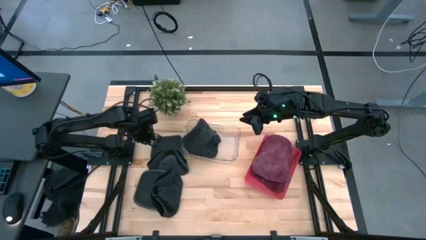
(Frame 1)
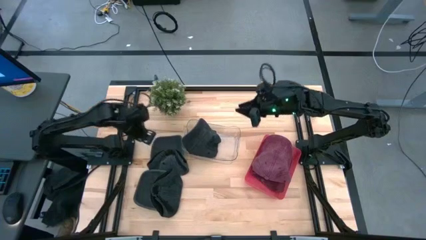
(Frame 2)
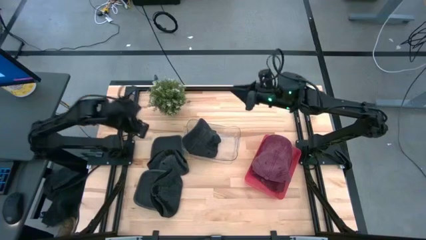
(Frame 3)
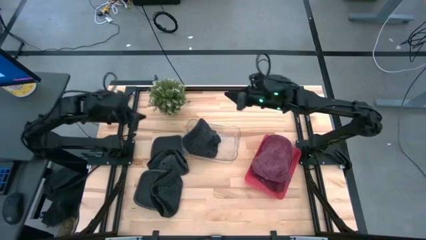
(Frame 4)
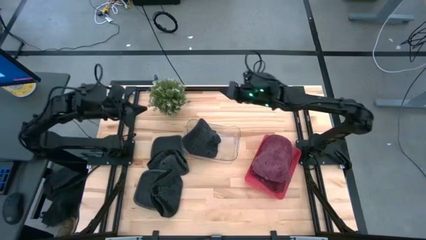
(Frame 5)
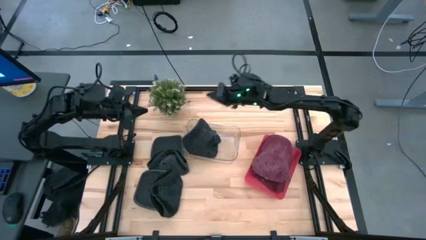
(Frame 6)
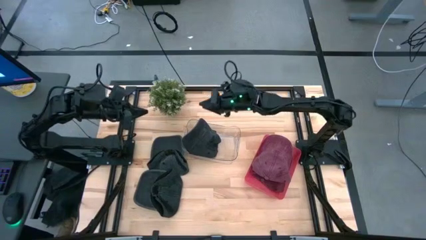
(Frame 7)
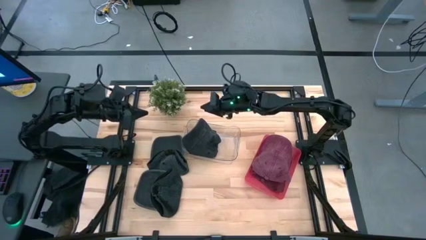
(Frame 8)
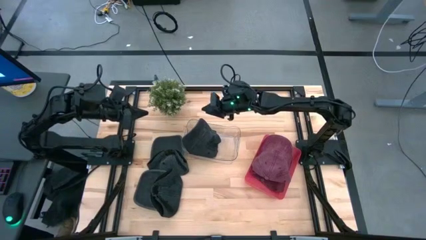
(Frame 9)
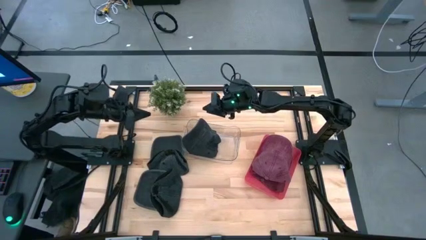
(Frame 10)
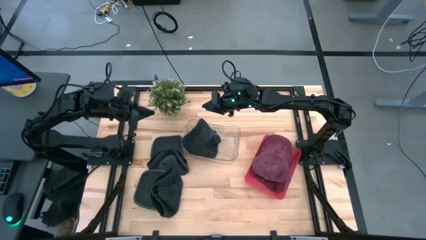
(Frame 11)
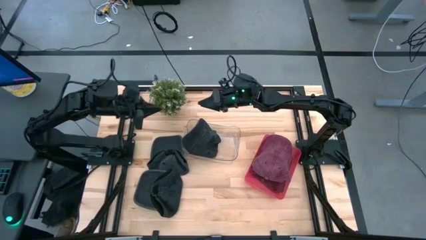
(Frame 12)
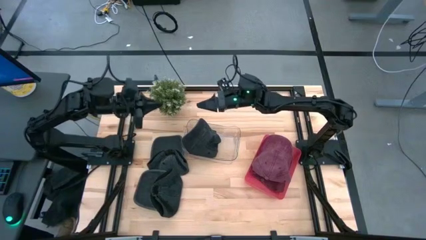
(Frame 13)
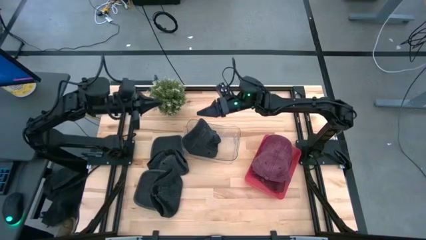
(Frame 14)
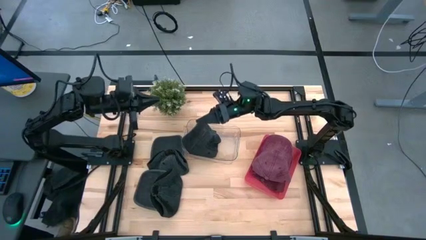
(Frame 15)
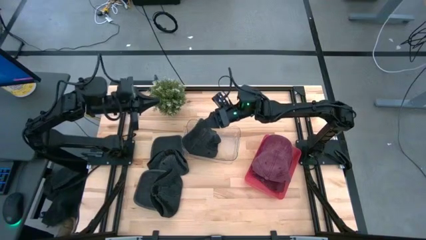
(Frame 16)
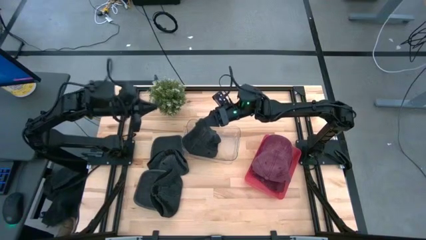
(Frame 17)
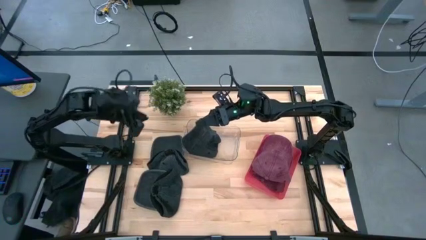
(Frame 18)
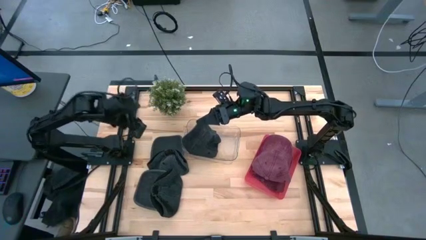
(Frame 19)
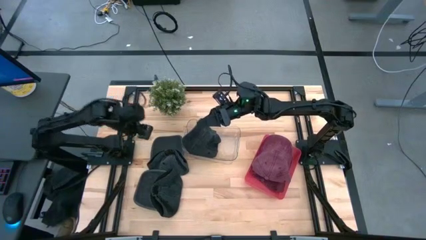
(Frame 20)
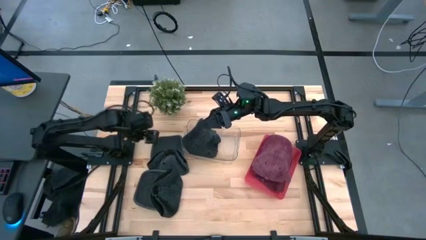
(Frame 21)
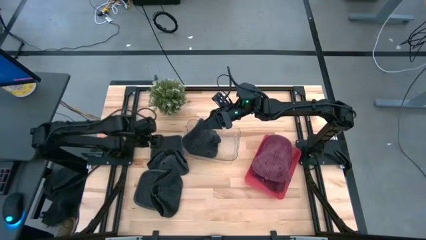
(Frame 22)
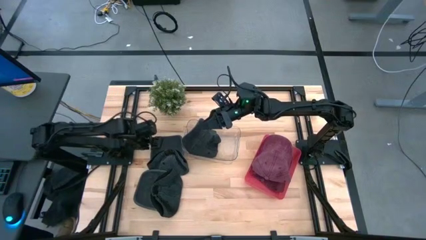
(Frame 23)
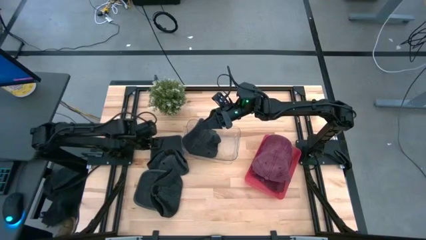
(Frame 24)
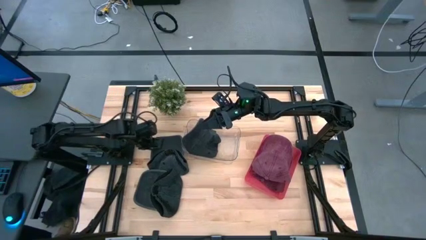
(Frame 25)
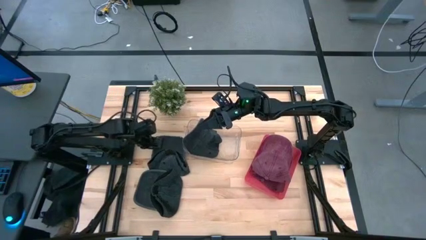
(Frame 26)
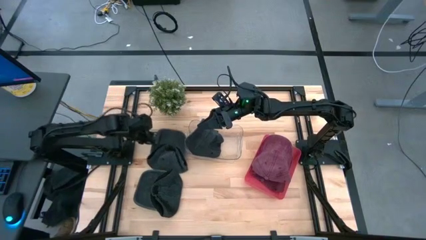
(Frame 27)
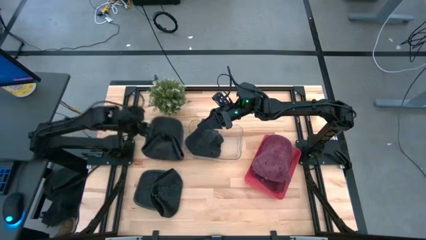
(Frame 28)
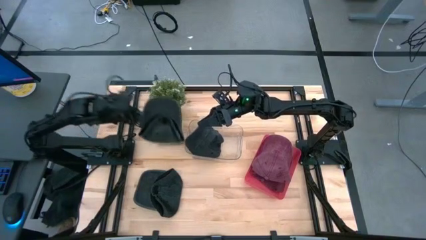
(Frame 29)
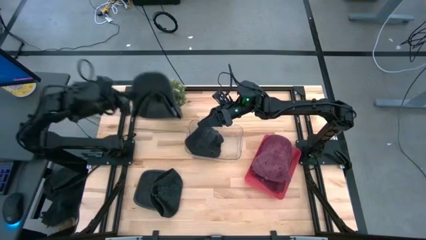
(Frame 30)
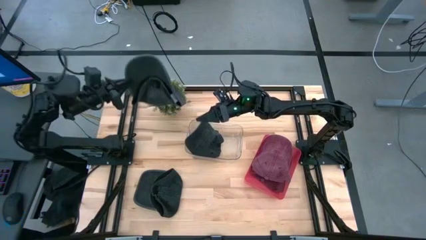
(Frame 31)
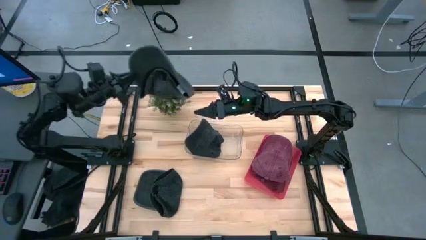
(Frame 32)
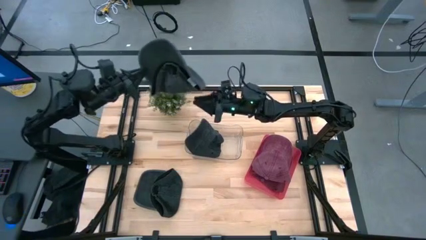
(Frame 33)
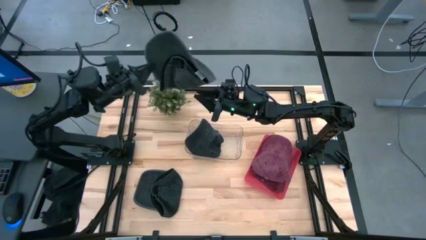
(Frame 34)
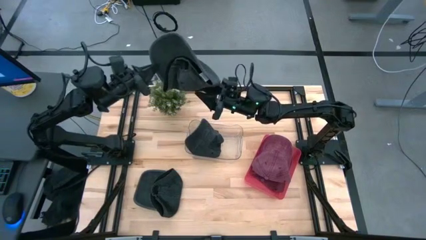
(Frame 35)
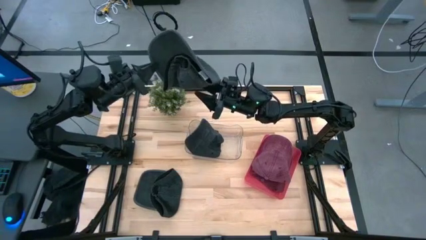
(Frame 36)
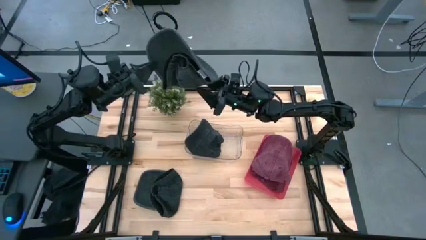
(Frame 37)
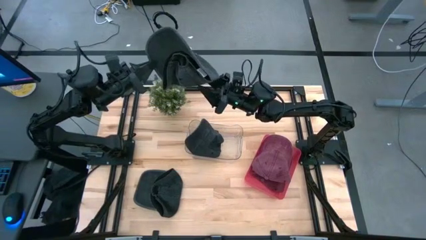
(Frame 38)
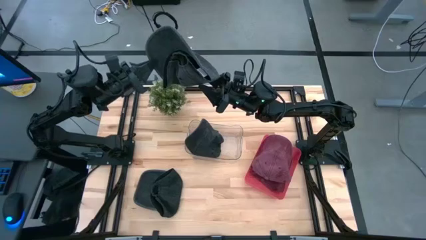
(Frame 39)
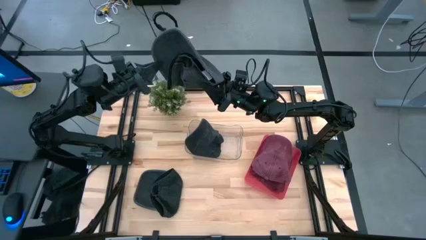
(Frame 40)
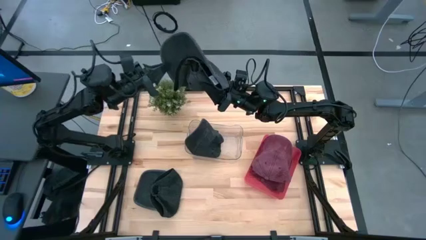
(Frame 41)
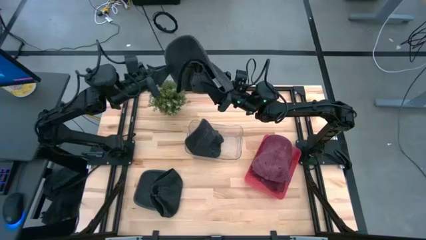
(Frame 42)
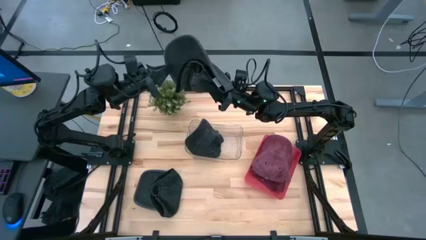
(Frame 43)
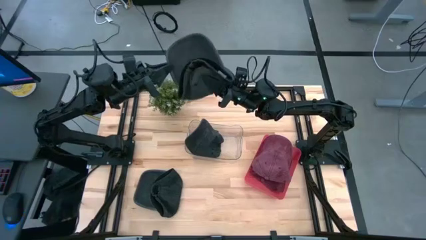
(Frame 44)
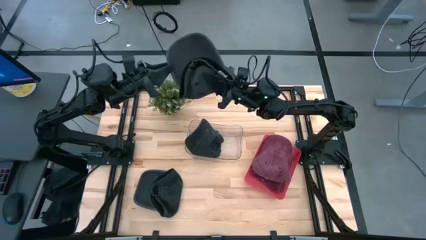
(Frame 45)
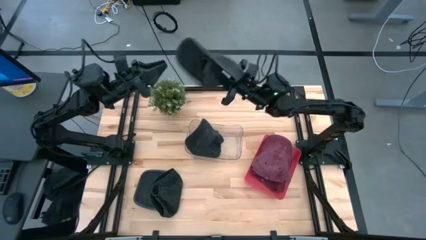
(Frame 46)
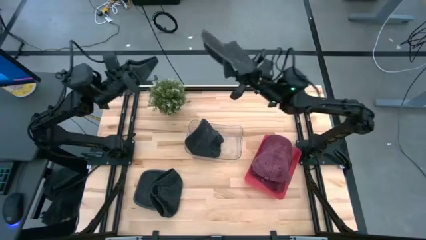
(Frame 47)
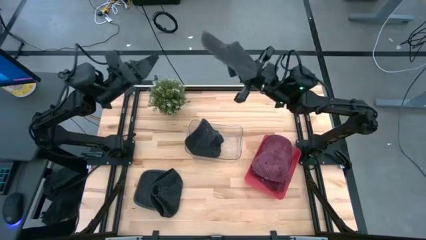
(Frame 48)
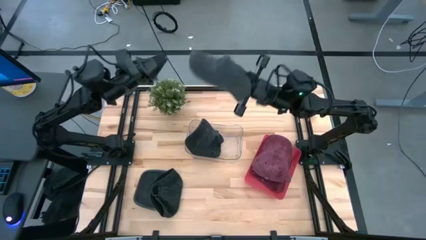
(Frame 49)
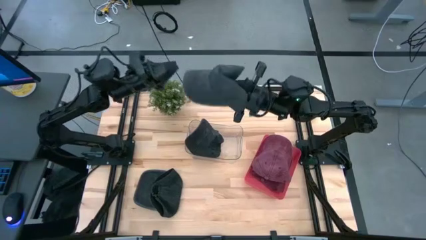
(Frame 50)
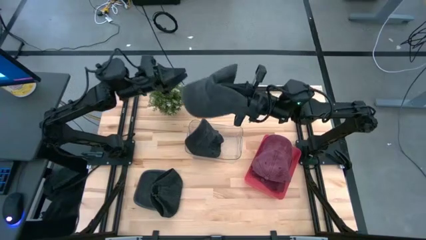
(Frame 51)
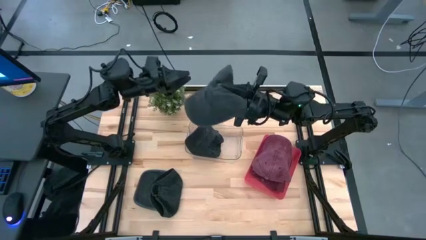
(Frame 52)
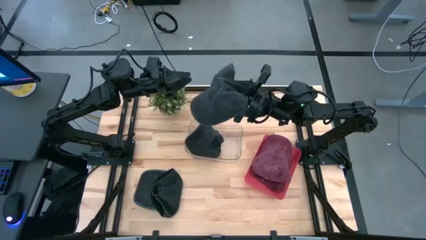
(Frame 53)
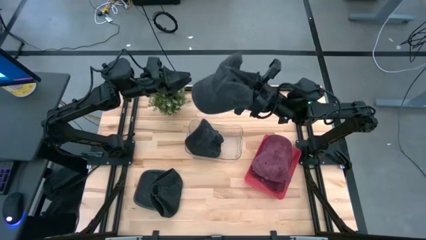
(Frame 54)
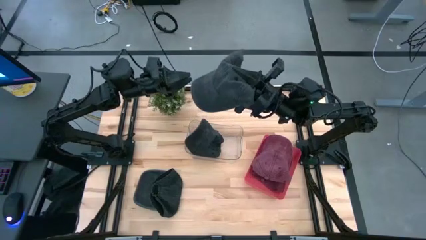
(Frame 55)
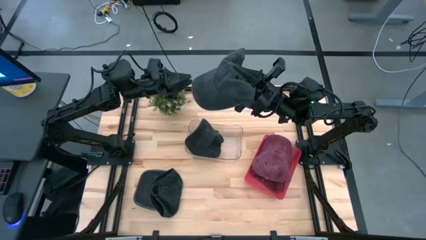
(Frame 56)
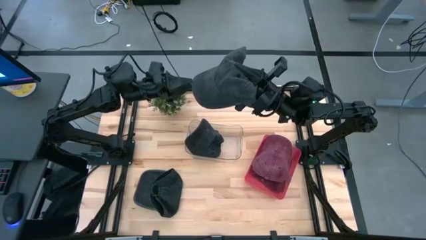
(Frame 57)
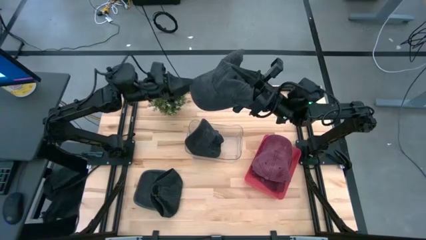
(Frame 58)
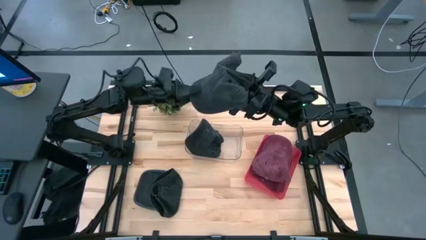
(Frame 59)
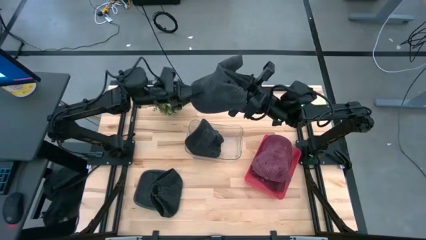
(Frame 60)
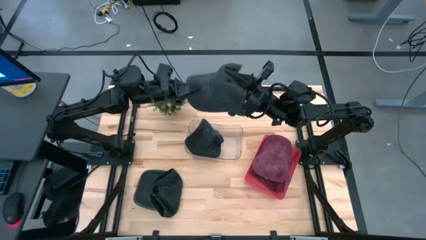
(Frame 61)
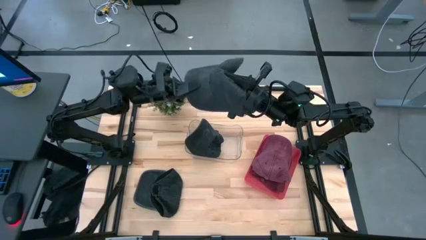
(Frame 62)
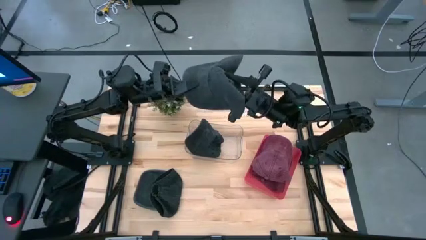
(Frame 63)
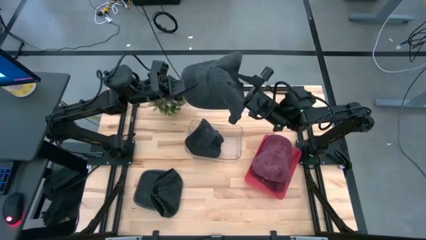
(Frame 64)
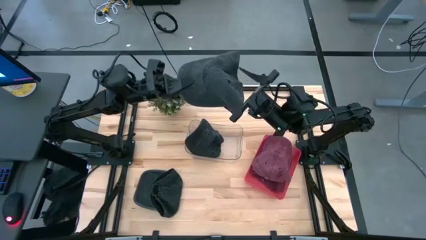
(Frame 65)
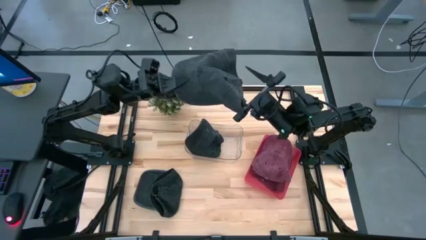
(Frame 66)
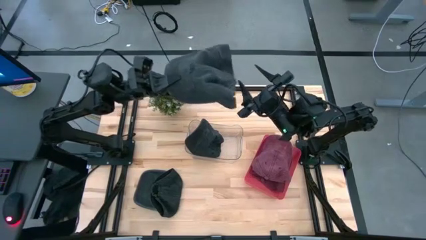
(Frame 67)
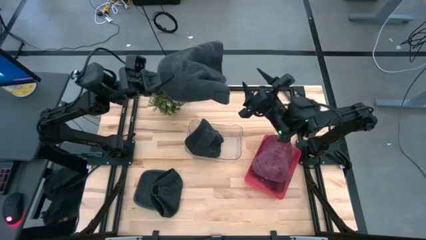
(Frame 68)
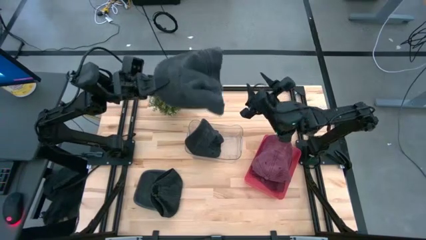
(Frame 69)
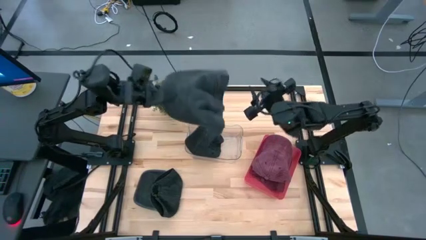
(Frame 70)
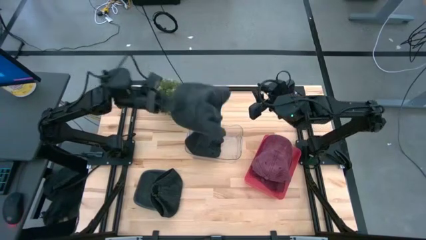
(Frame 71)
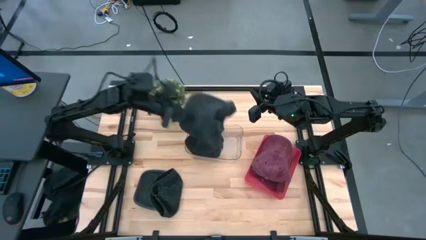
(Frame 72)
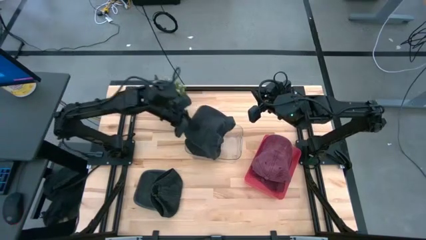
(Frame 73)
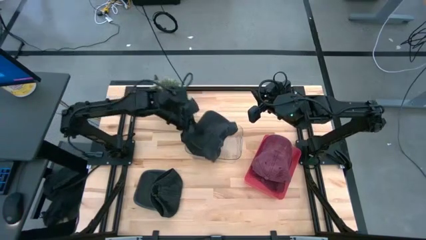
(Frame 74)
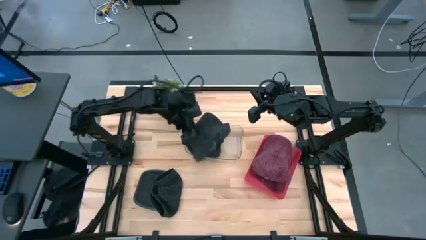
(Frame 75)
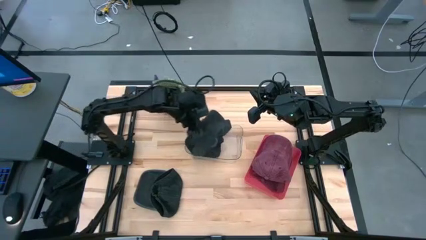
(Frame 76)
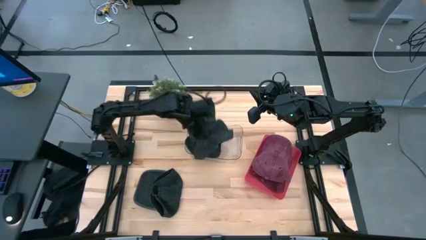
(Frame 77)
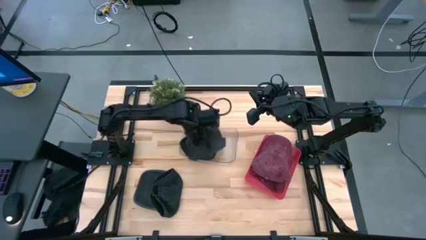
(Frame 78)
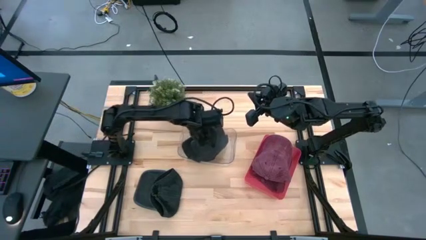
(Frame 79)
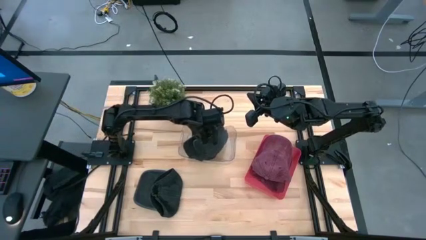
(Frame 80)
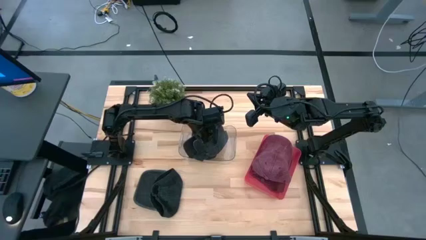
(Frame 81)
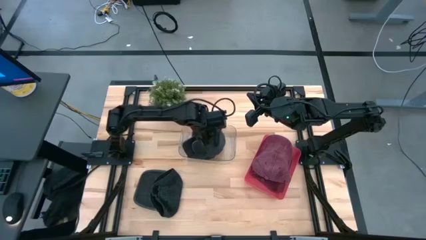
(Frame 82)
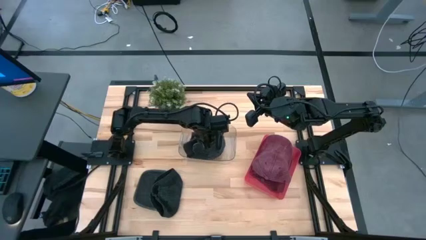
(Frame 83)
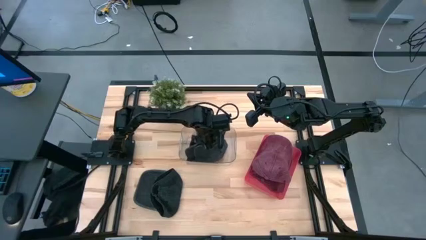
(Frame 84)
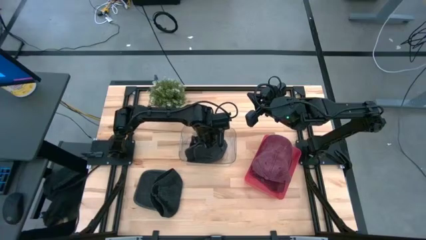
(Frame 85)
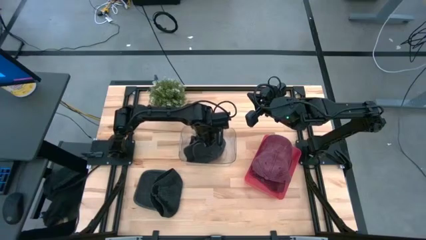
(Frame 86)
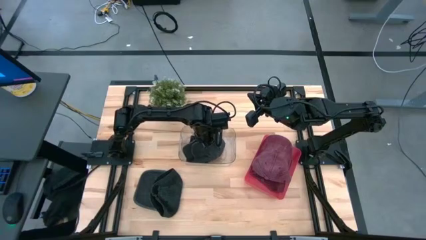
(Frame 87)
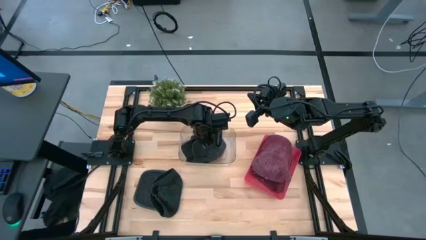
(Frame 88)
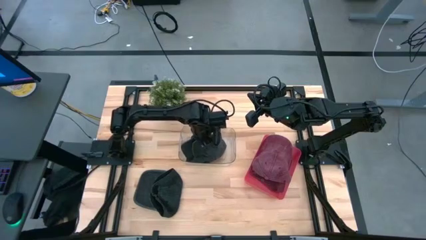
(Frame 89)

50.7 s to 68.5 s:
Task: Pick & Place hat
Put the top black cap into the transparent bin
